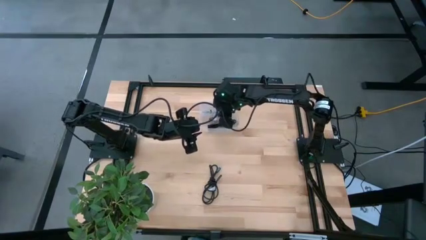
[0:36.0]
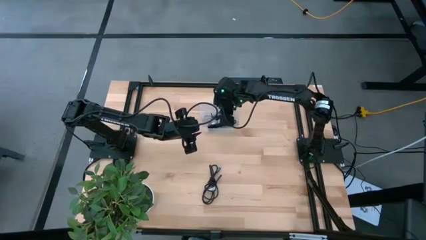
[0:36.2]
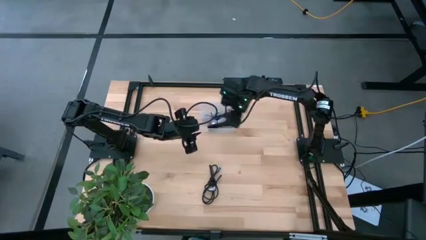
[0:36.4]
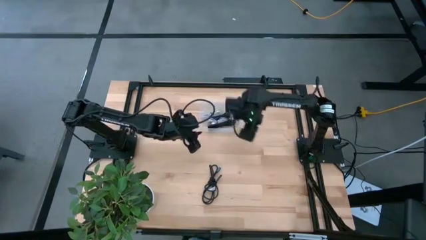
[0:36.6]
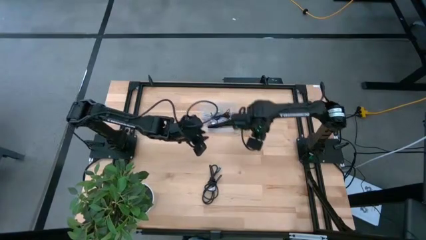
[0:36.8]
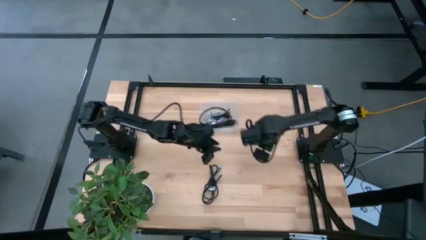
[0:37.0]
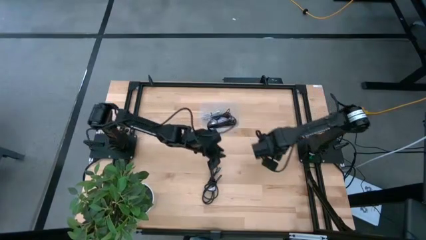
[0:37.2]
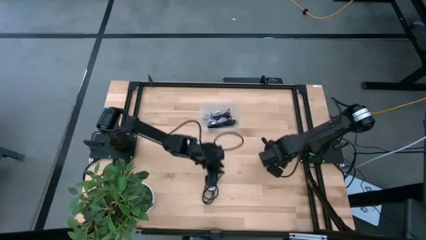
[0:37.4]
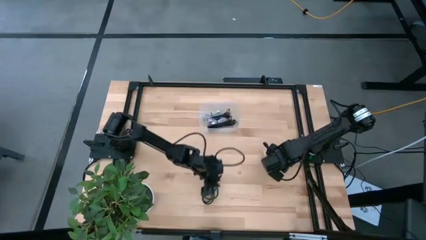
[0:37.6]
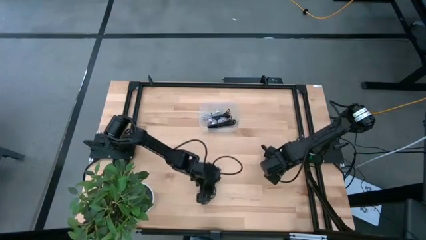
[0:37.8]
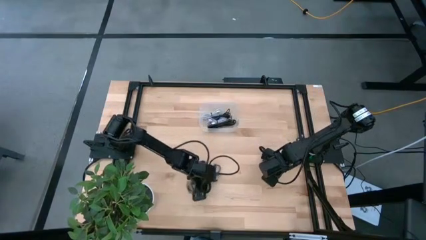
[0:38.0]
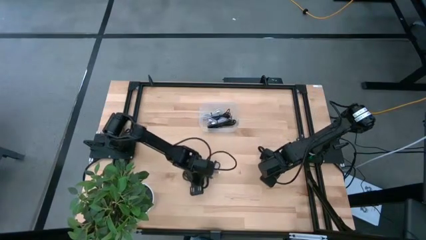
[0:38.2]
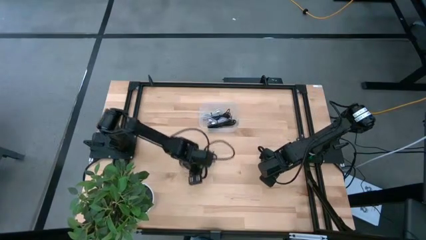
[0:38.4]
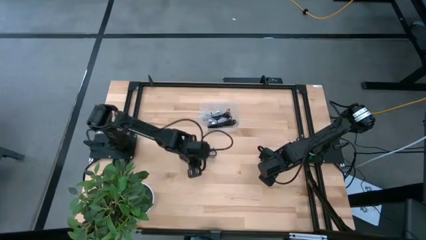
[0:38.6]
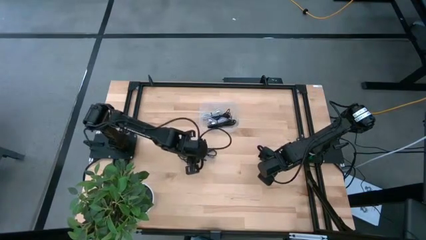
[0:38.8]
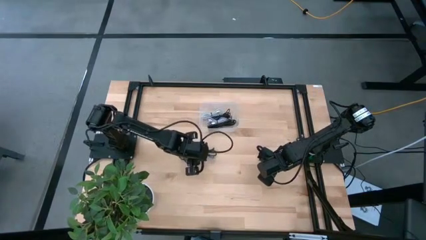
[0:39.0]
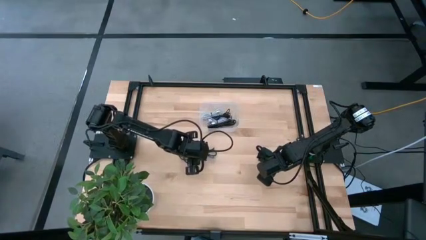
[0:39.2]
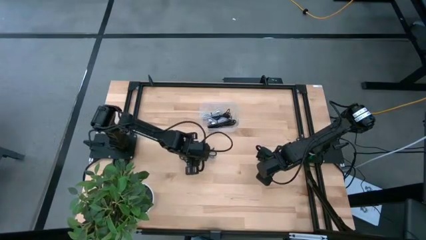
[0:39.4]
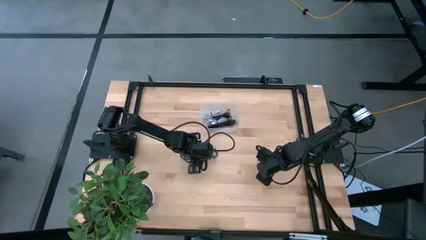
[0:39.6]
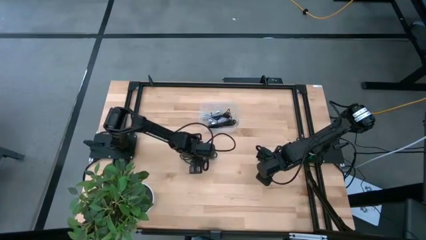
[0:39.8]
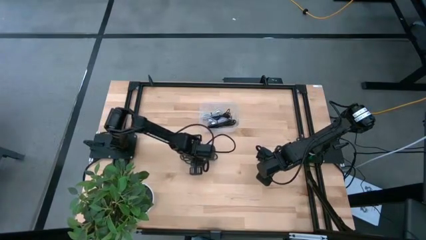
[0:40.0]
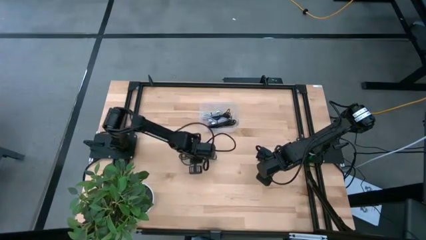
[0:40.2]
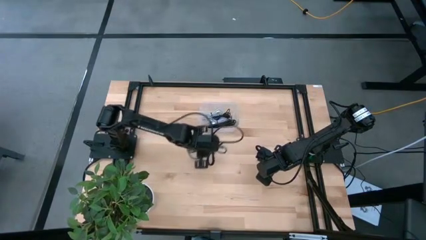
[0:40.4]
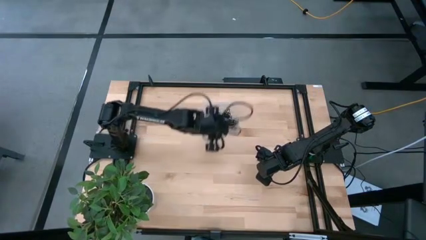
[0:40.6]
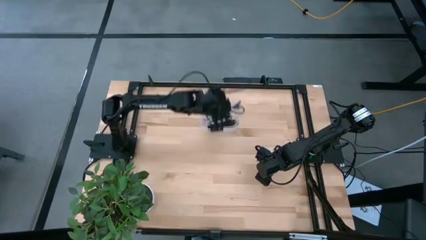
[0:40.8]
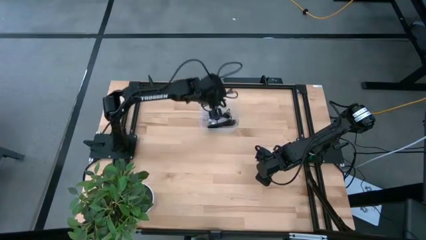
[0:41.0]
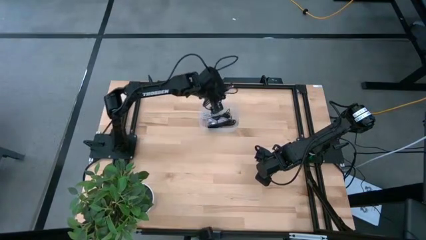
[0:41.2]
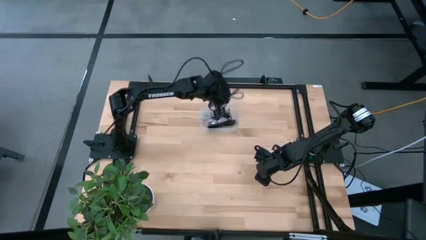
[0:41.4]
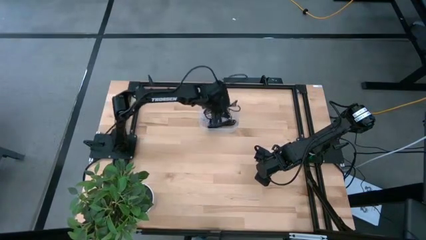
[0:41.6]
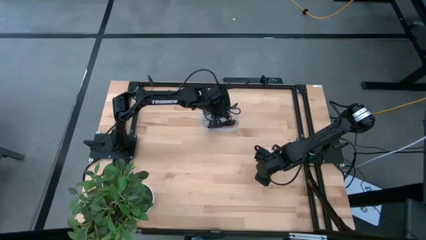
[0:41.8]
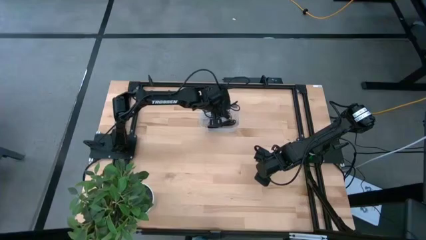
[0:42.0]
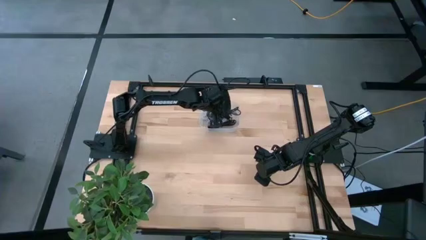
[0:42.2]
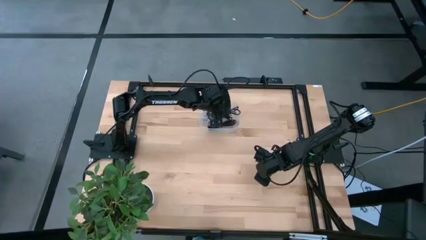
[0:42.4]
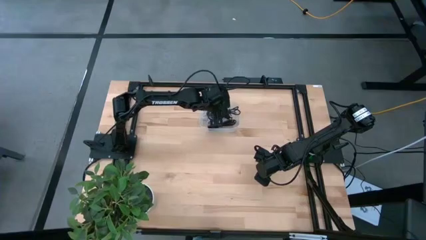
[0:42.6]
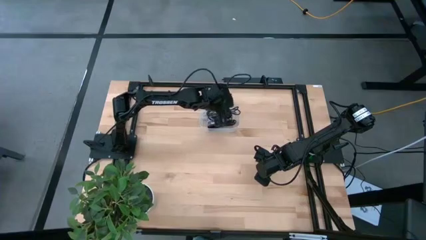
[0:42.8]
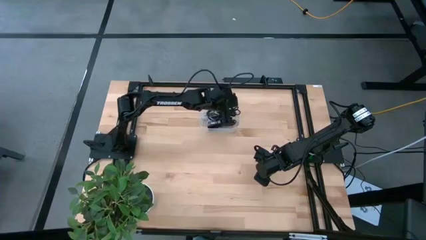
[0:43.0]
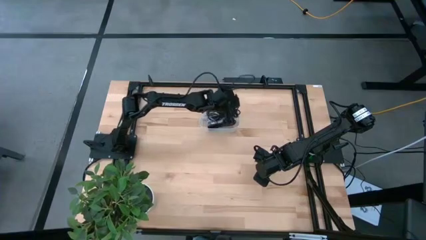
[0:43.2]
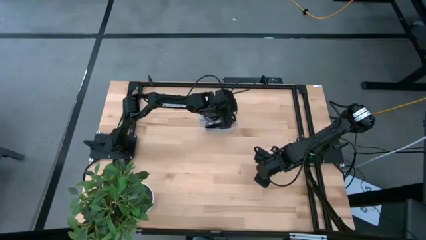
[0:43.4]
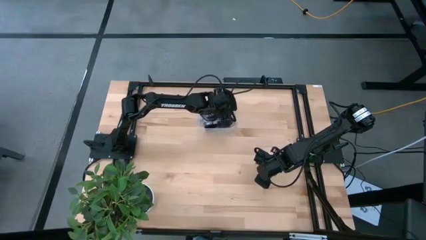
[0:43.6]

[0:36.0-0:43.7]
Task: Pick and place USB-C Cables
Put the black charger cable into the transparent bin

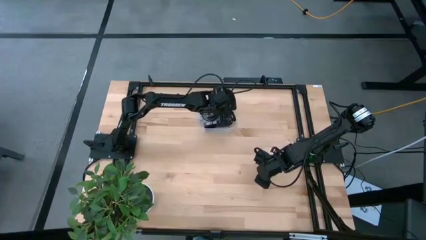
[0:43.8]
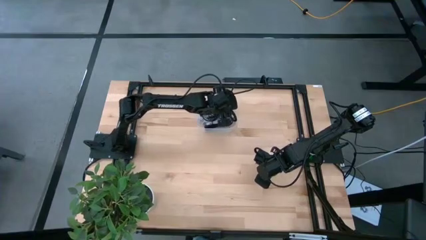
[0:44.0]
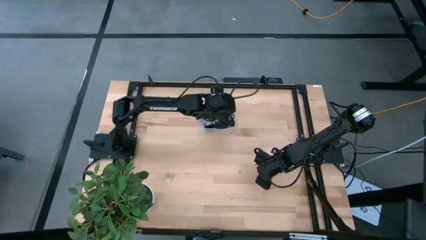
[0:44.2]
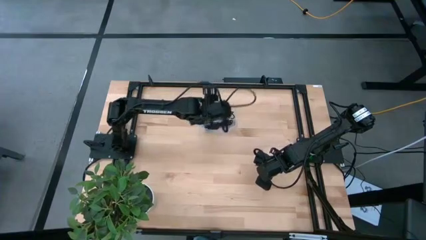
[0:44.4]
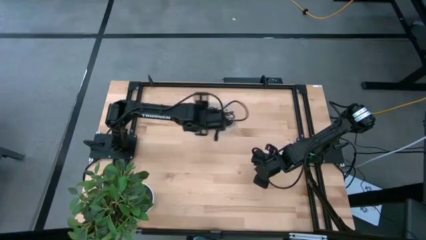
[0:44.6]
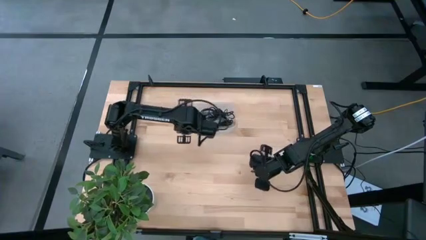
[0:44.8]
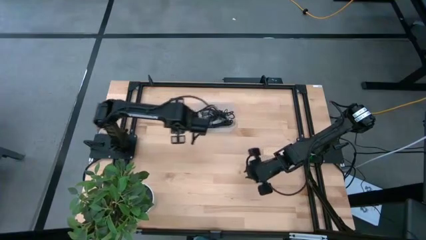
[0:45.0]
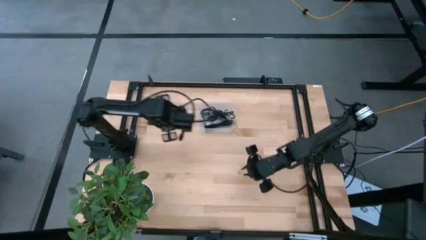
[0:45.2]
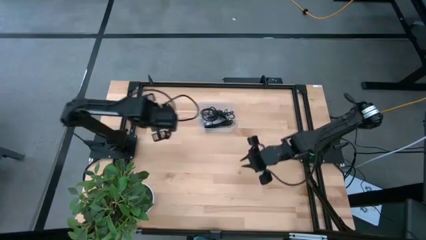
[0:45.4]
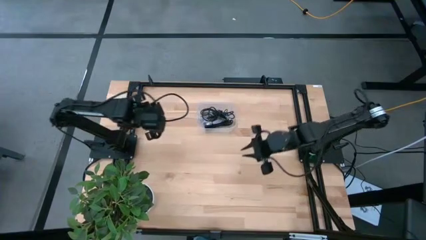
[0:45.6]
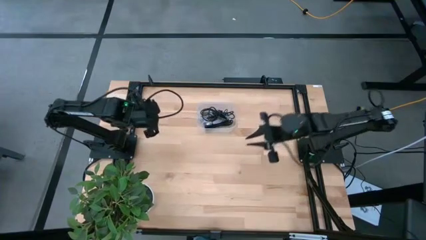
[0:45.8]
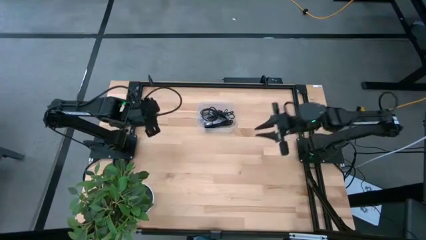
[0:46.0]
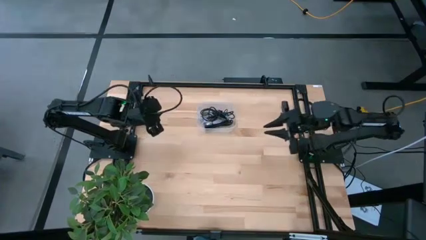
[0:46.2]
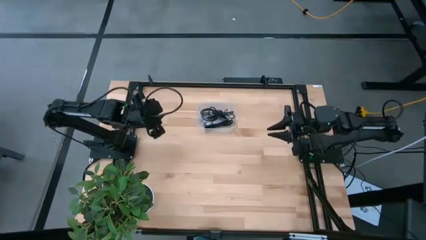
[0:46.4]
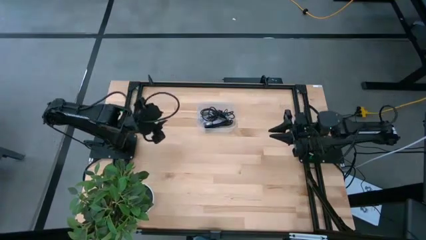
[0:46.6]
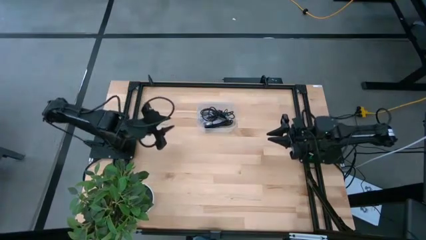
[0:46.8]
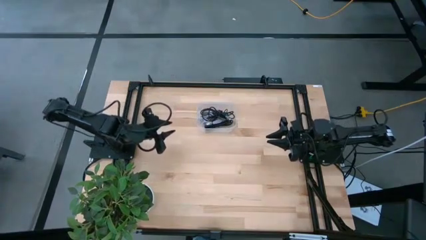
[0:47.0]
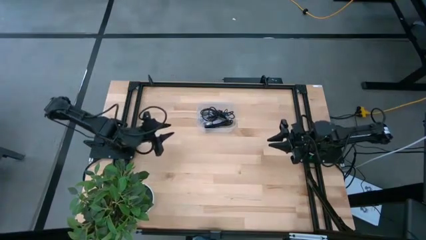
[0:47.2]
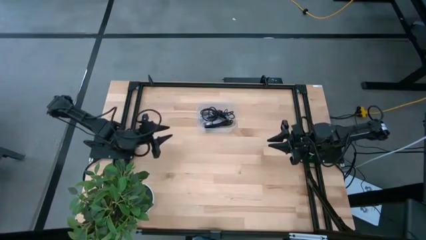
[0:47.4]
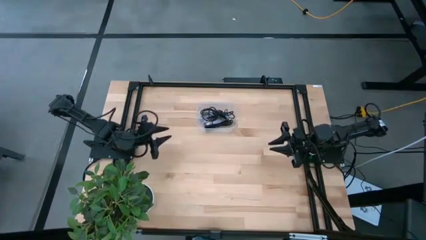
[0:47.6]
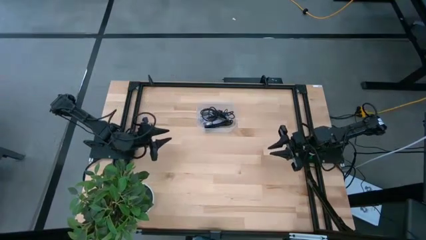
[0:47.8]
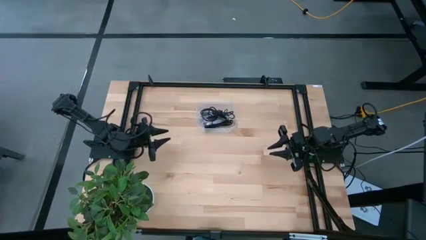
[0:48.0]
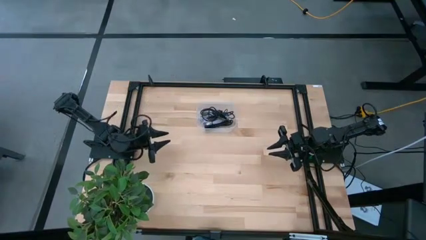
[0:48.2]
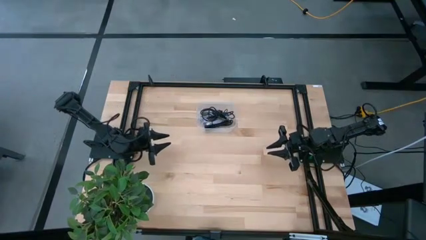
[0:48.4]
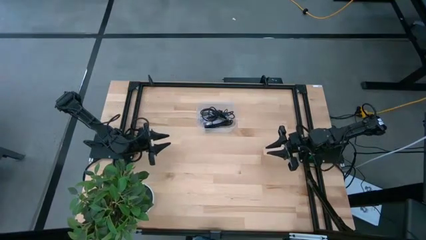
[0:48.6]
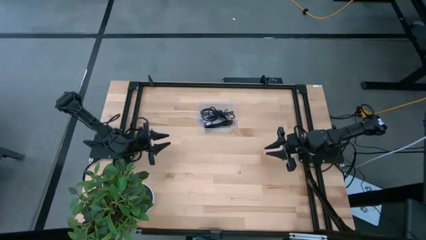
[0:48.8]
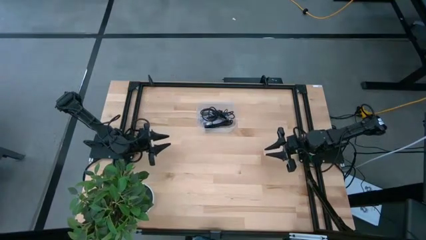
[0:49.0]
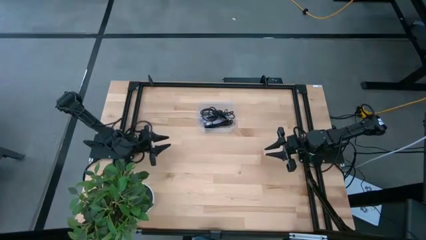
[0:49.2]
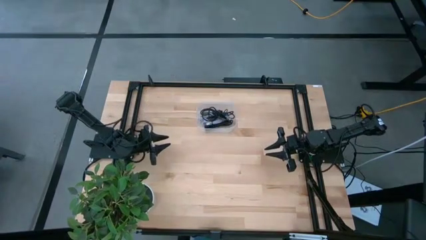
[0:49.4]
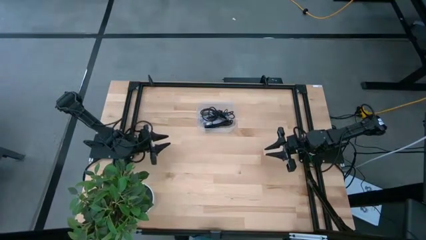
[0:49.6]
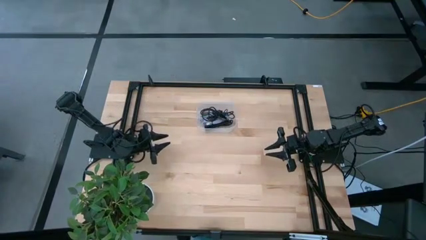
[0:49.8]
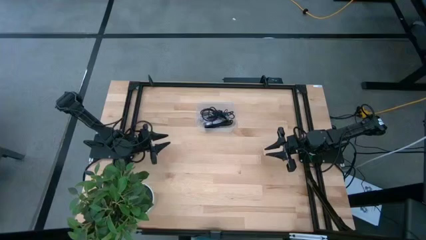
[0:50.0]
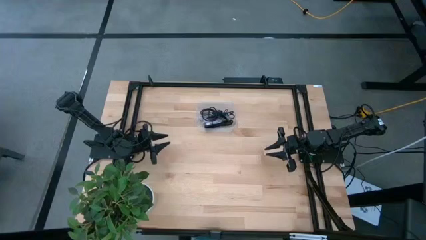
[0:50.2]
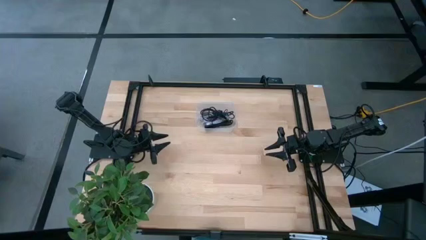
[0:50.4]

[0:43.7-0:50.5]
Return to Home Position

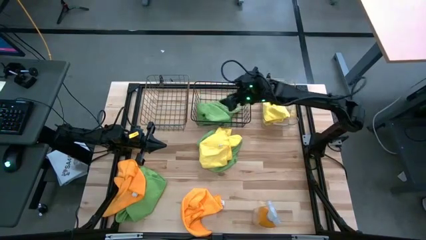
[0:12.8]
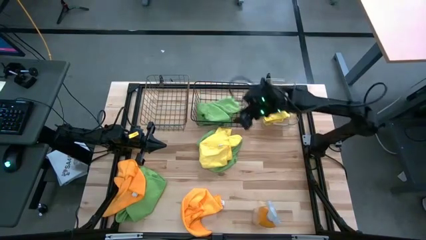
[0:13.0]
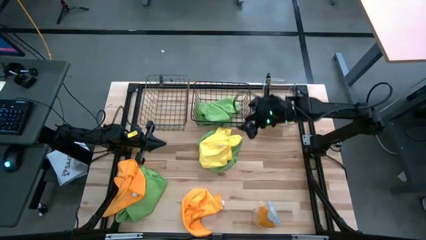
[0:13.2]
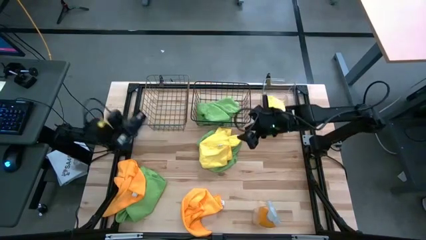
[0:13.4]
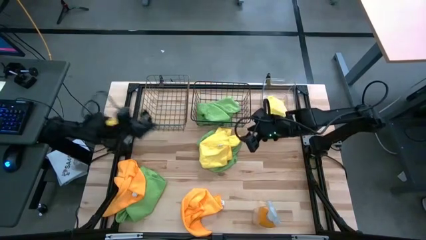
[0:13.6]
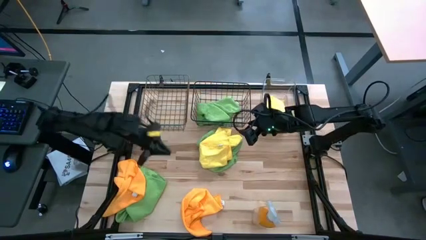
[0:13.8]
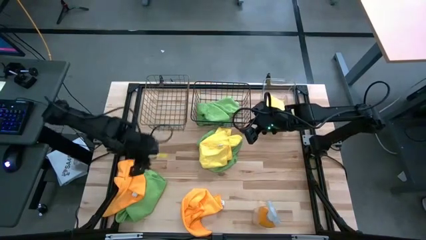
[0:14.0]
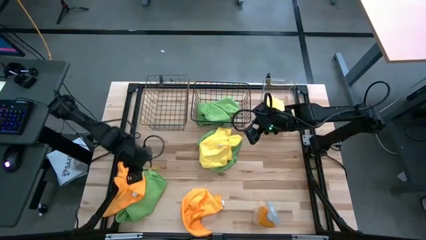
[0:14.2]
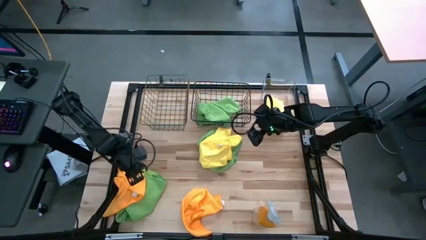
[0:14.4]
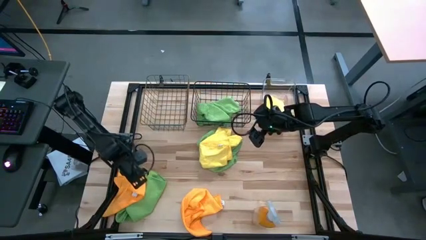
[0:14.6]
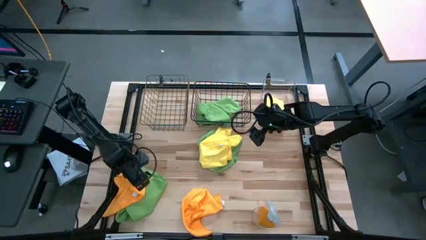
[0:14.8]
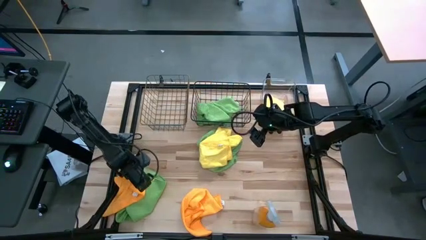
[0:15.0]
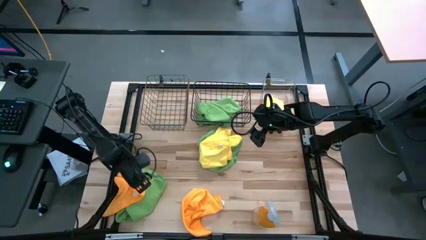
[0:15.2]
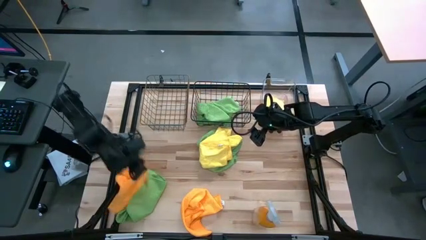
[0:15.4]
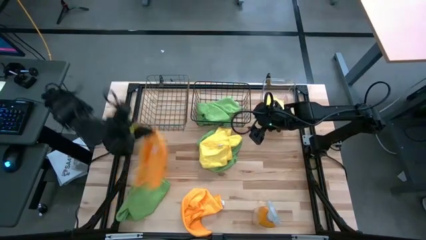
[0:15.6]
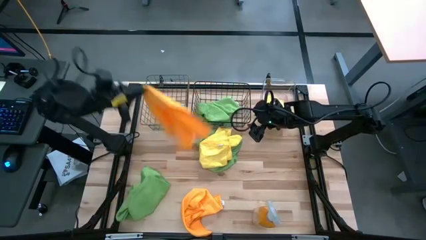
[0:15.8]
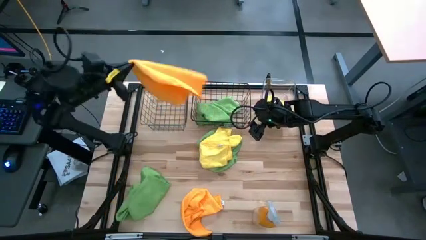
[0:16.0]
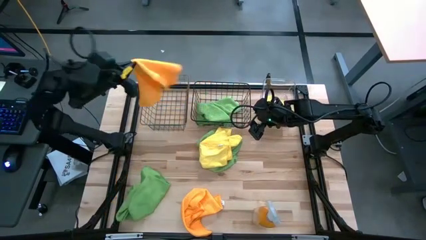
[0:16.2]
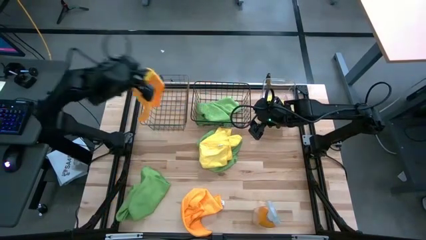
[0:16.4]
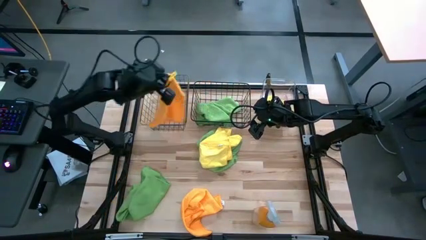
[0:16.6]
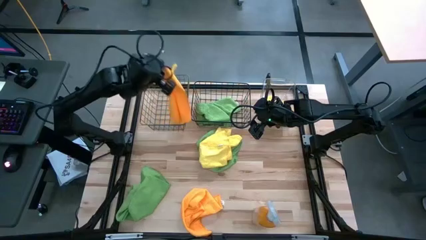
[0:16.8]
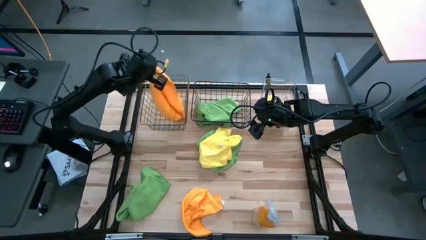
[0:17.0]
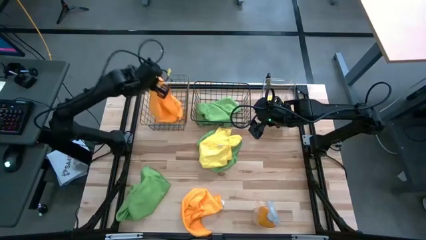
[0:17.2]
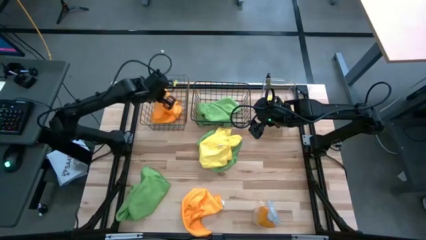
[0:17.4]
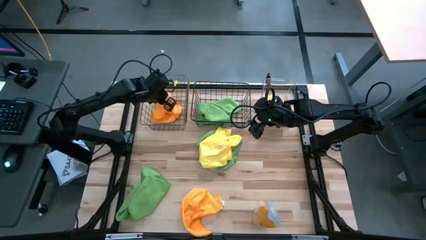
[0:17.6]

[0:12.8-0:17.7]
Task: Sort microfiber towel by color & place in baskets
Put the left orange microfiber towel into the brown wire basket
